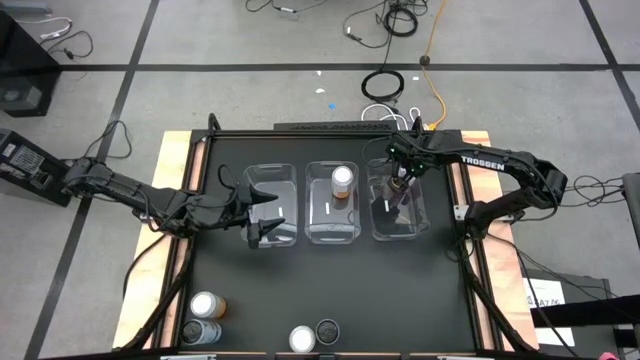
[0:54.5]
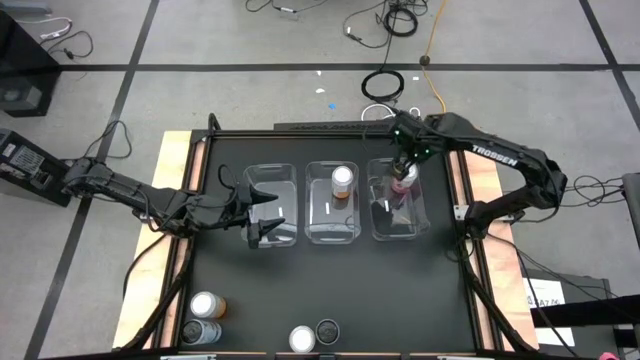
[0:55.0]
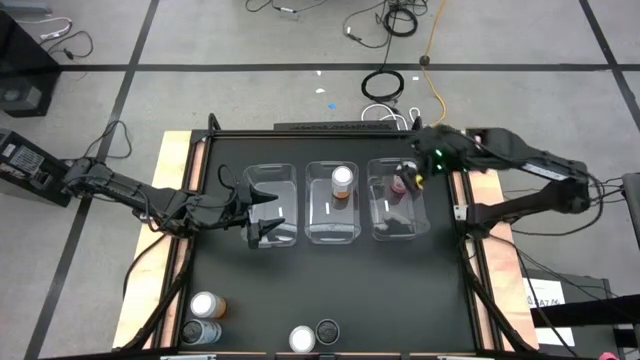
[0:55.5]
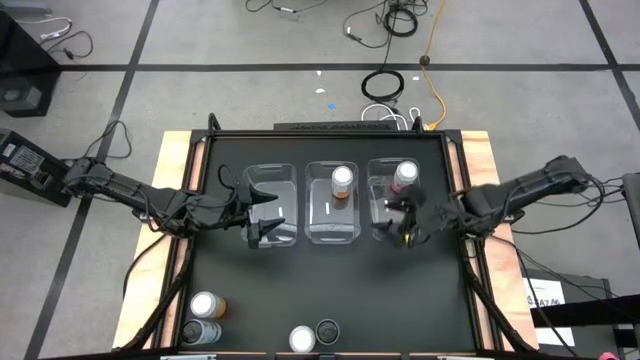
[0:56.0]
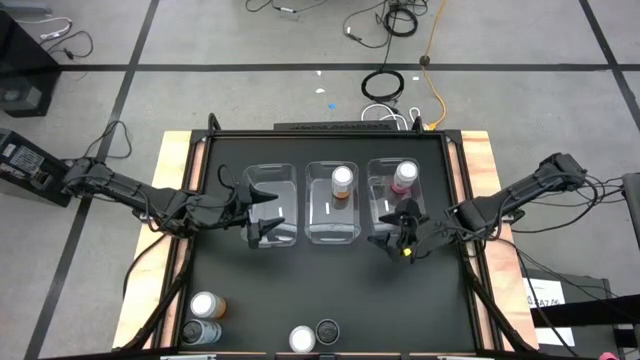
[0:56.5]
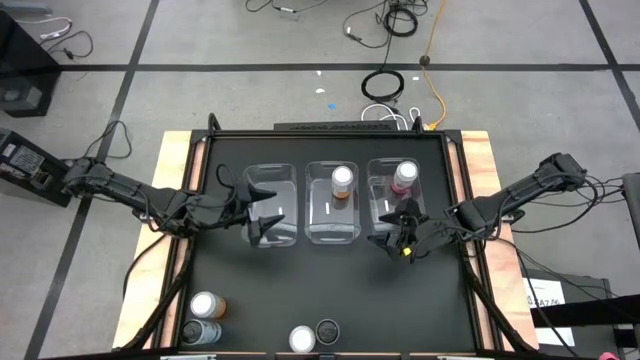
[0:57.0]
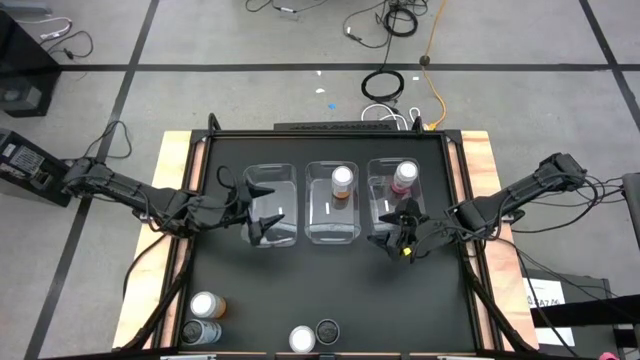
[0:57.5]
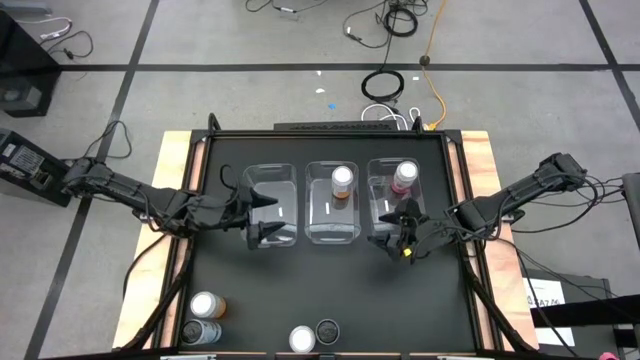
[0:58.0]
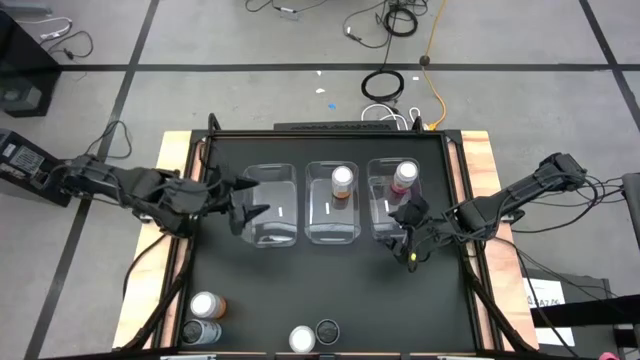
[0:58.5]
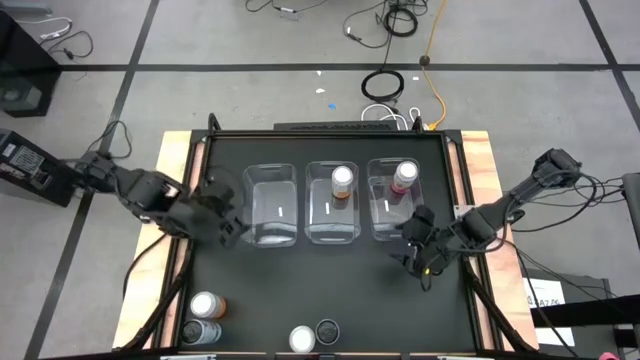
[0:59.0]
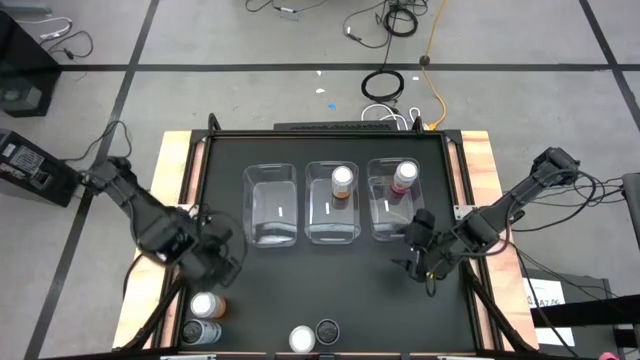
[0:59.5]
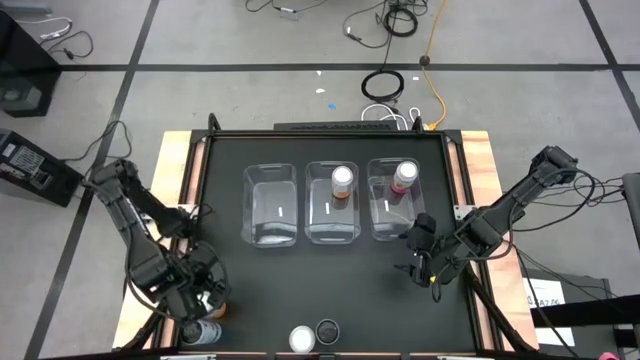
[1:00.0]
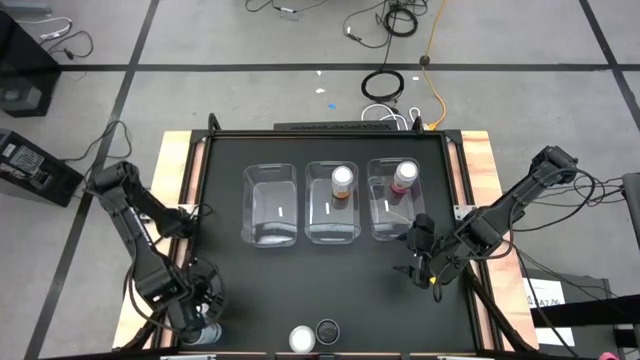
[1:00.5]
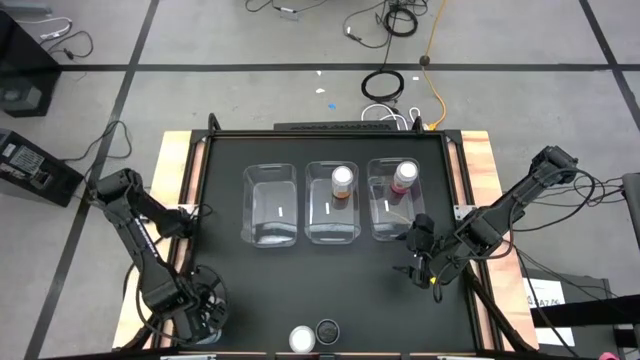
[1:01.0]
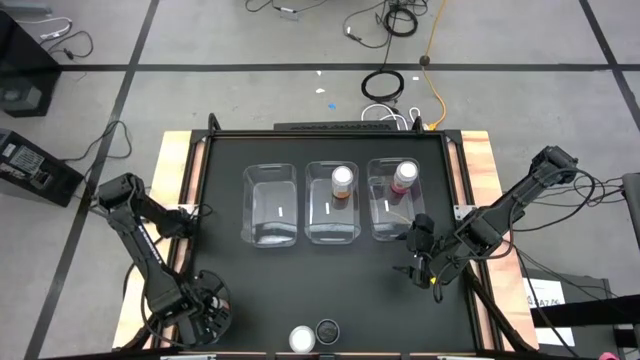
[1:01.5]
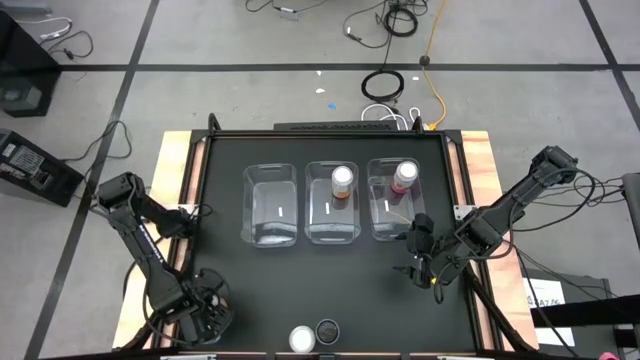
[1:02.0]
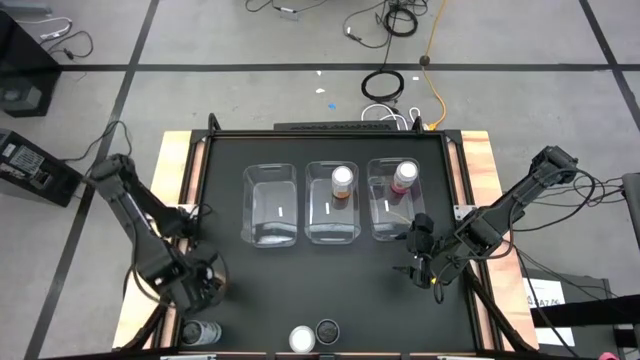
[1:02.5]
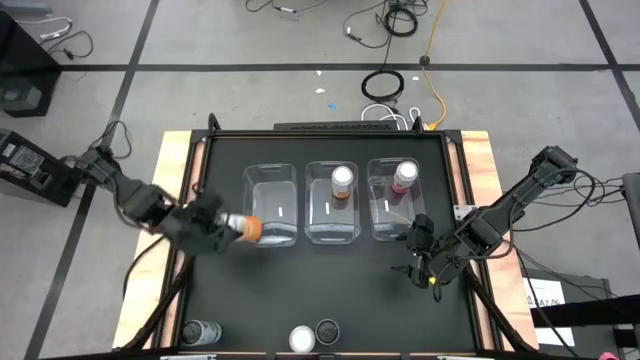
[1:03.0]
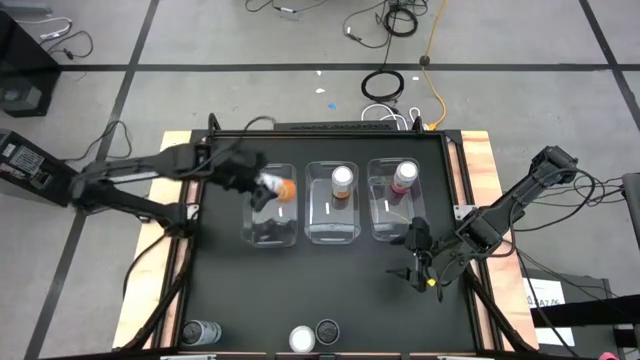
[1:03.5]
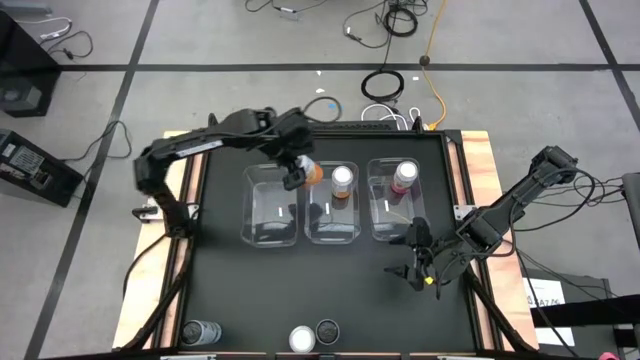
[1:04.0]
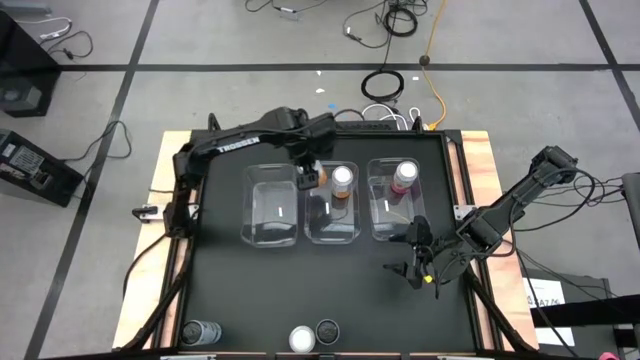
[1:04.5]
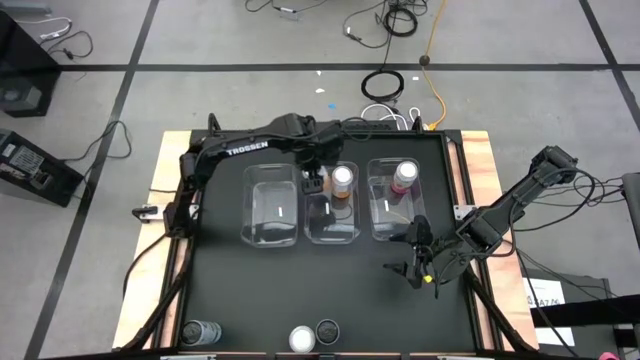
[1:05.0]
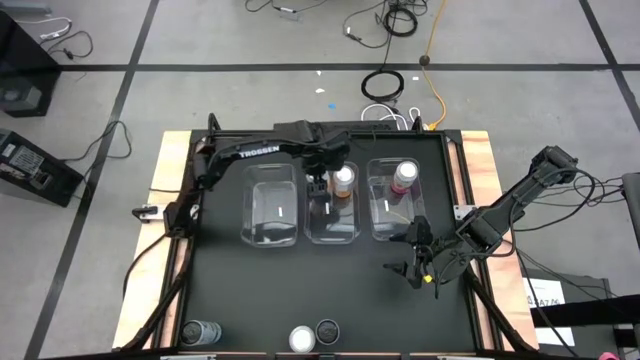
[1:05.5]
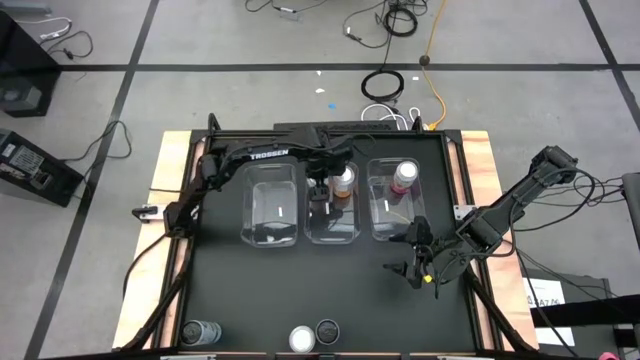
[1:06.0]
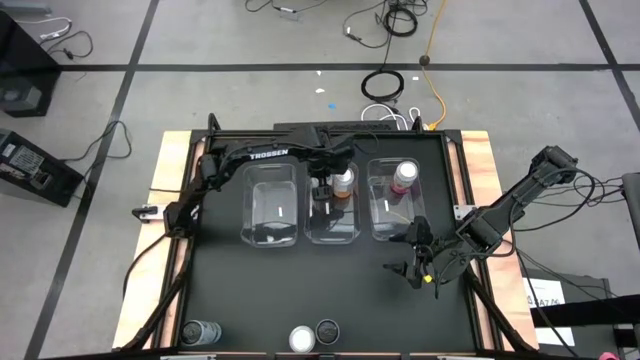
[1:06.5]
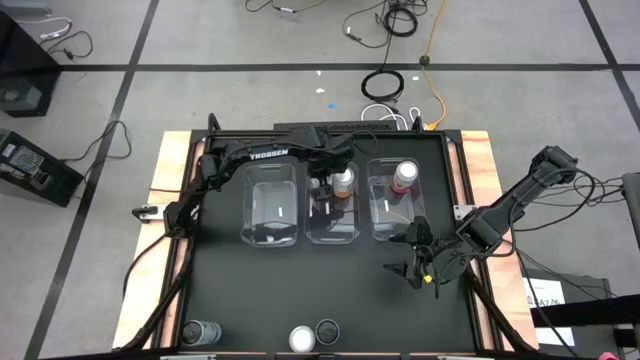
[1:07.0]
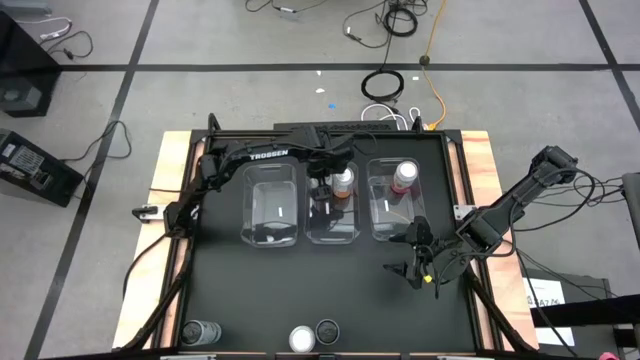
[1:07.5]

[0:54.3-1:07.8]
Task: Sort soda cans
Put the orange soda can into the middle transparent bin

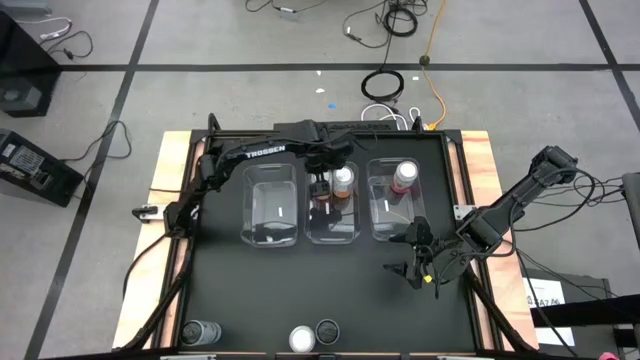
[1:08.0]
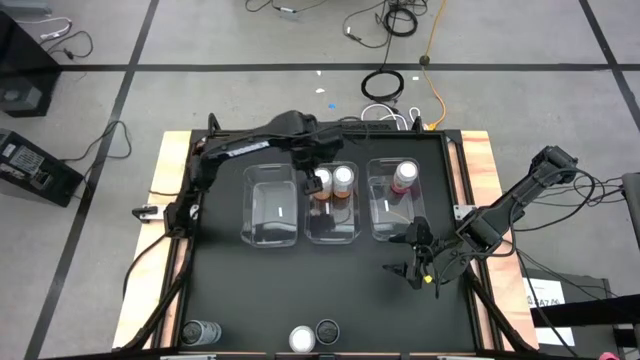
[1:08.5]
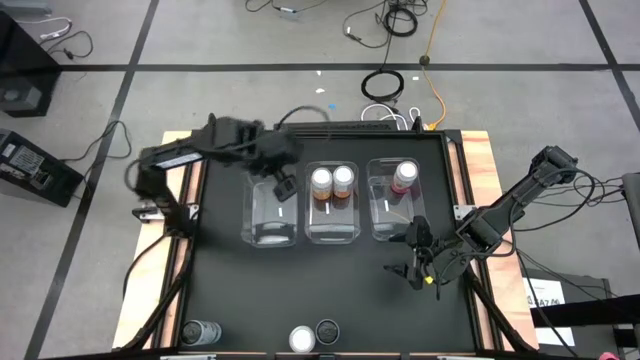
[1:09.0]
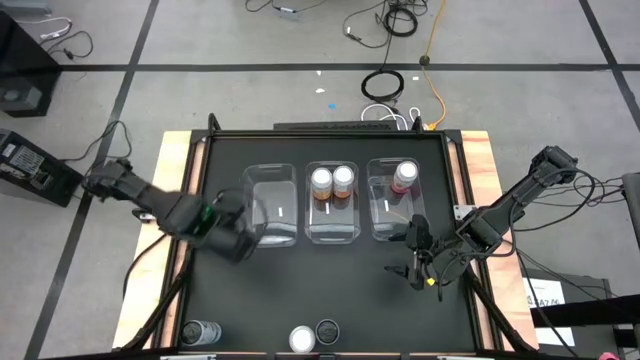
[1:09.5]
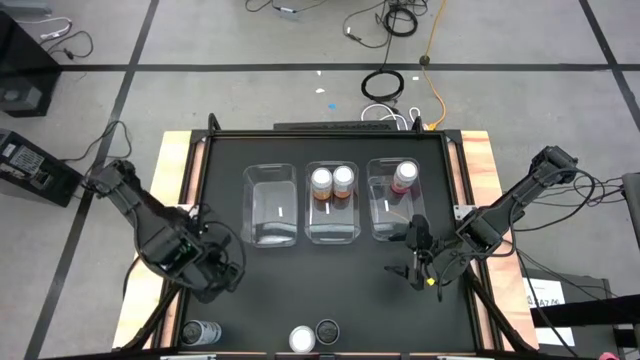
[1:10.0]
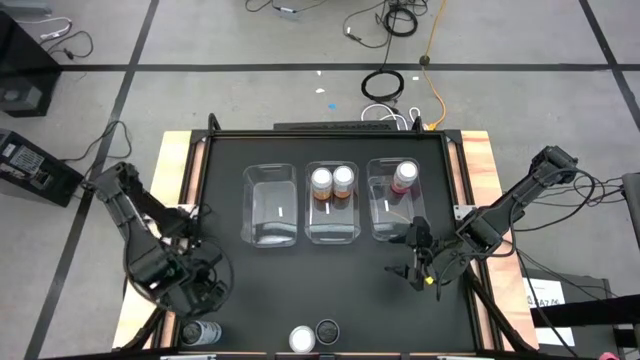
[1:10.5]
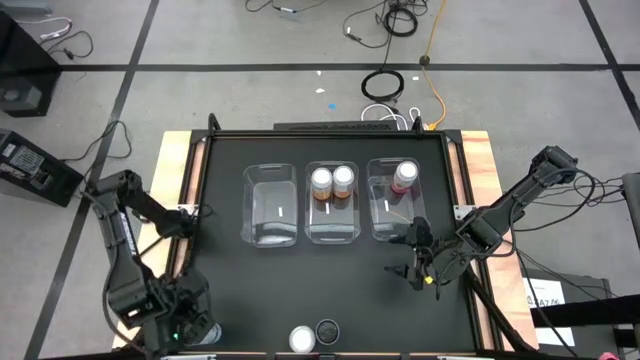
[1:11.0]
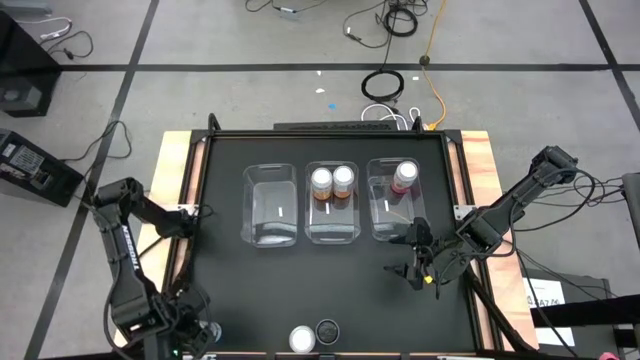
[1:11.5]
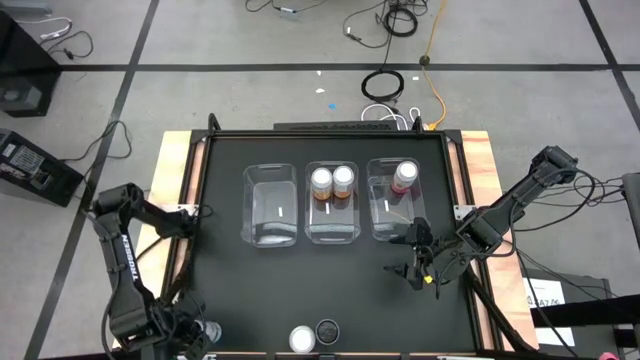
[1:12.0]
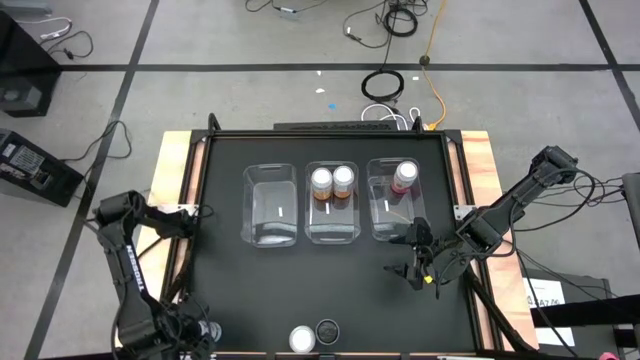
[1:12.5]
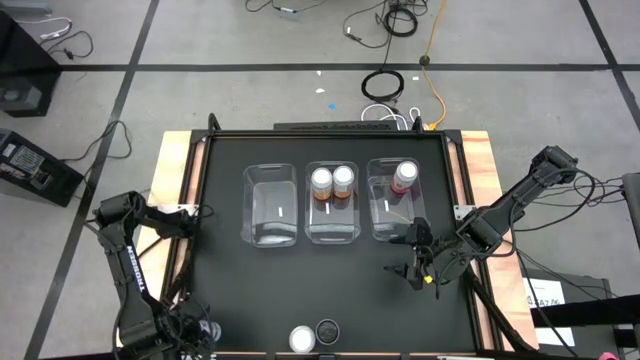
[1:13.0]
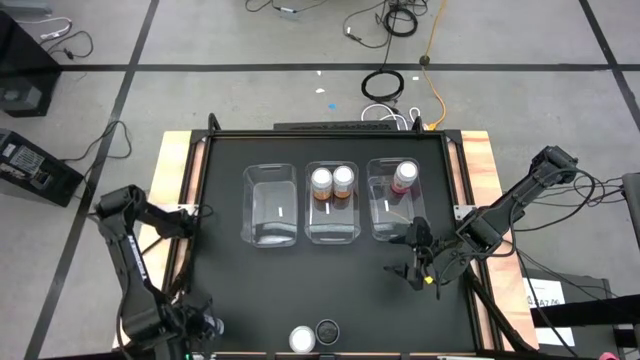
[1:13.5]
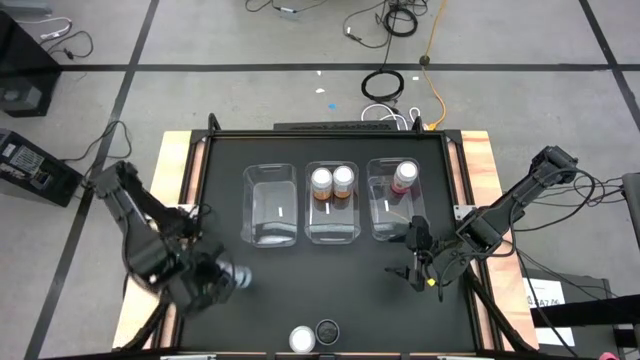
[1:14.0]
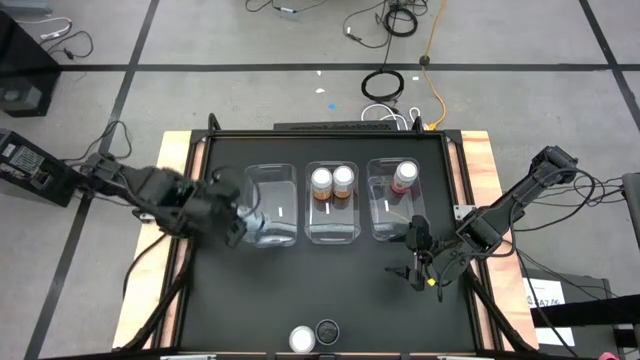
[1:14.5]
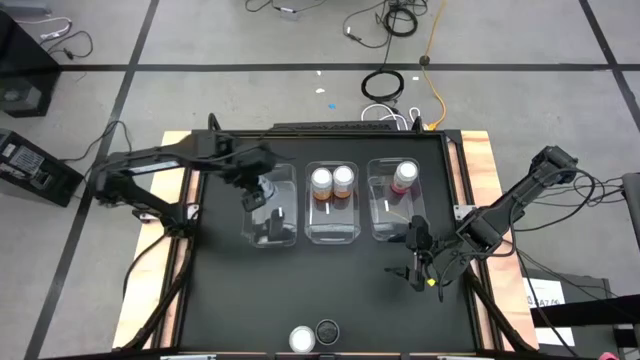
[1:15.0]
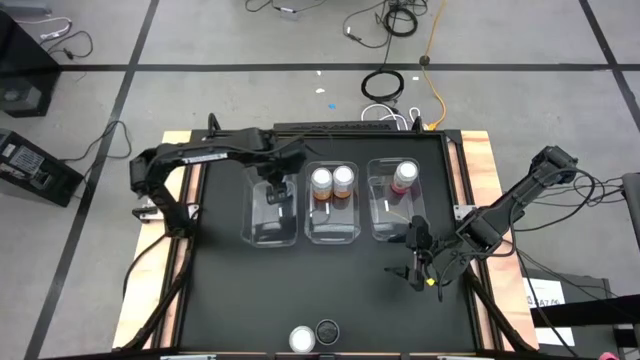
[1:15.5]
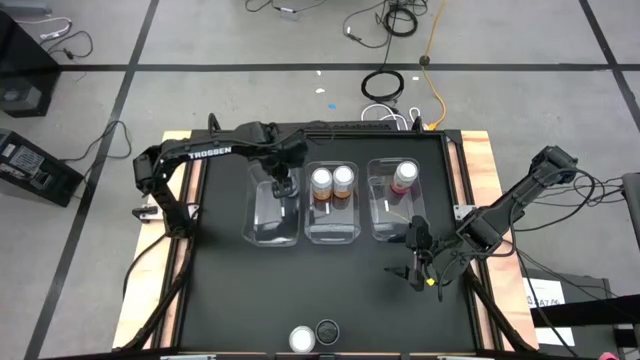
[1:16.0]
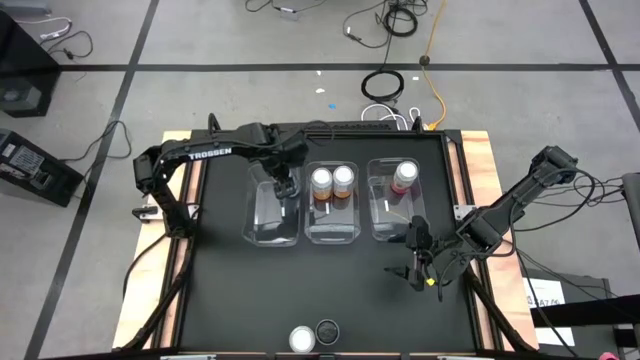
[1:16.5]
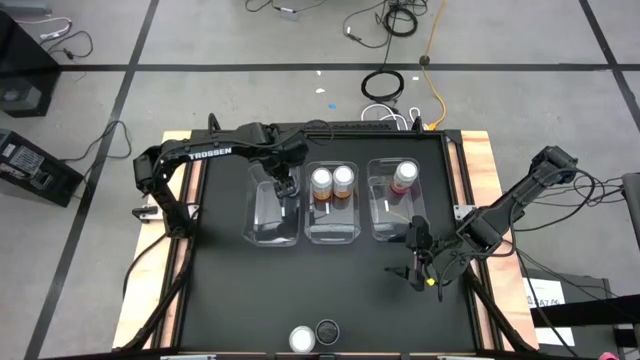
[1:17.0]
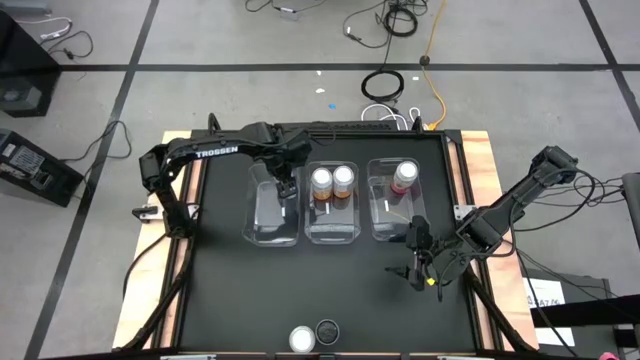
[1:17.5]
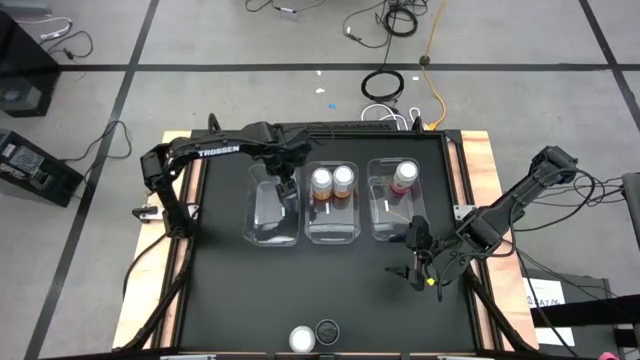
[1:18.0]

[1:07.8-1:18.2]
Put the left white soda can into the left transparent bin
